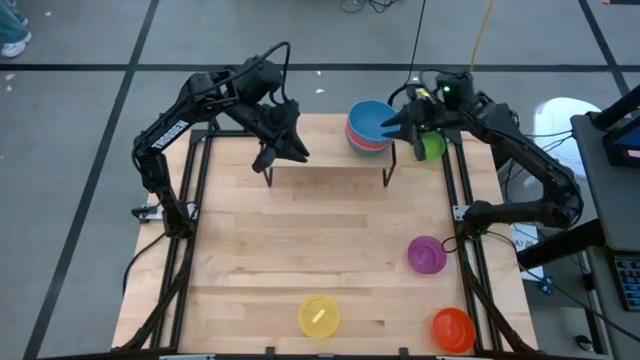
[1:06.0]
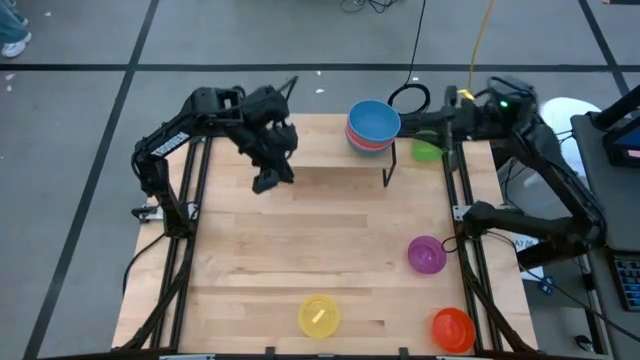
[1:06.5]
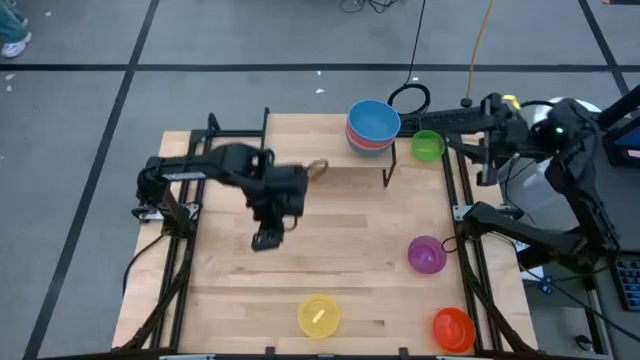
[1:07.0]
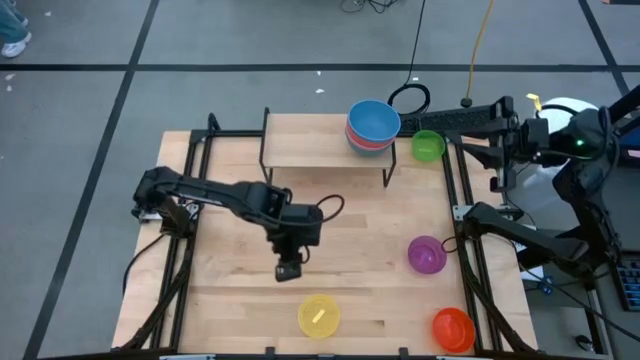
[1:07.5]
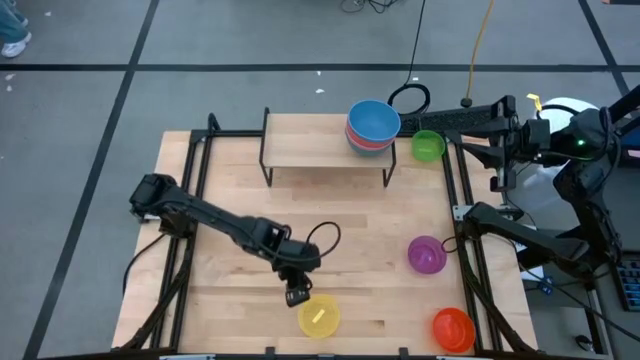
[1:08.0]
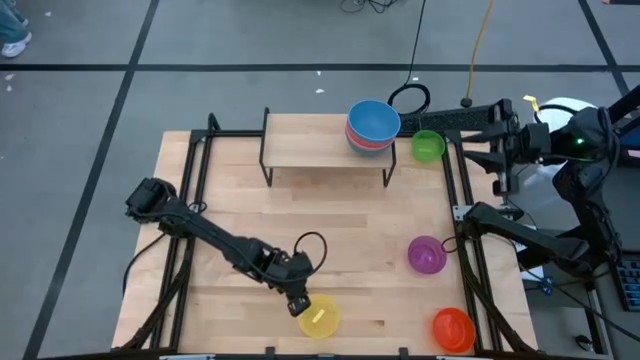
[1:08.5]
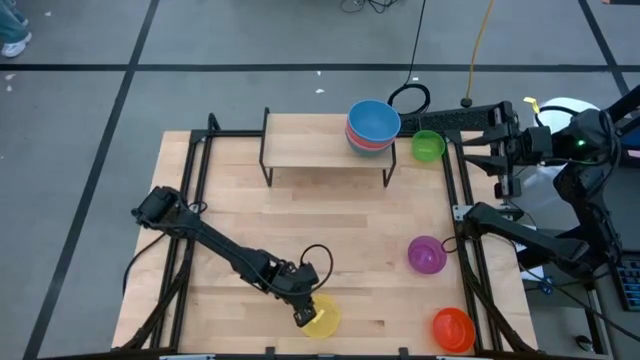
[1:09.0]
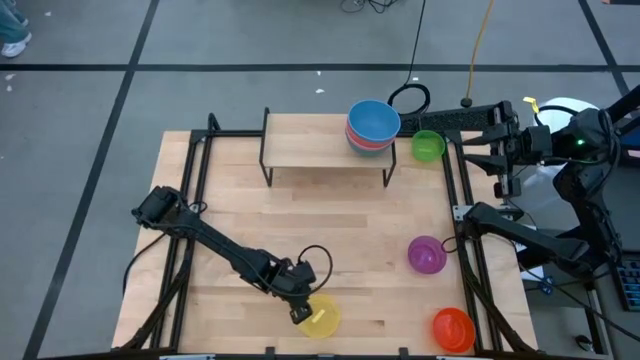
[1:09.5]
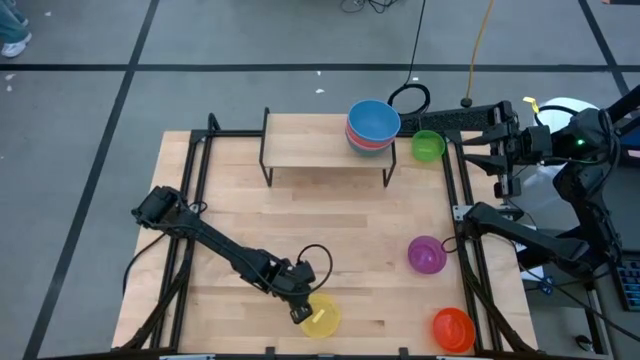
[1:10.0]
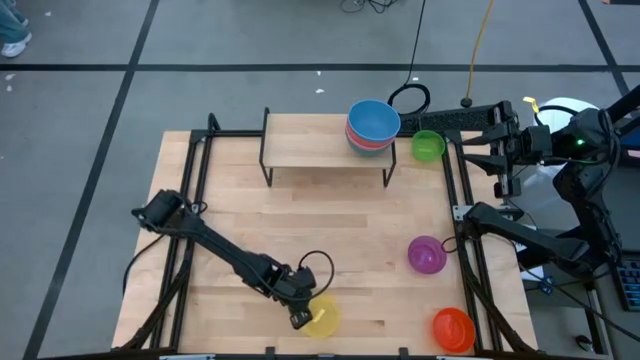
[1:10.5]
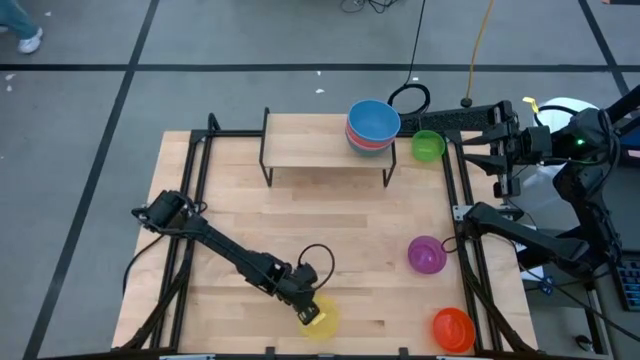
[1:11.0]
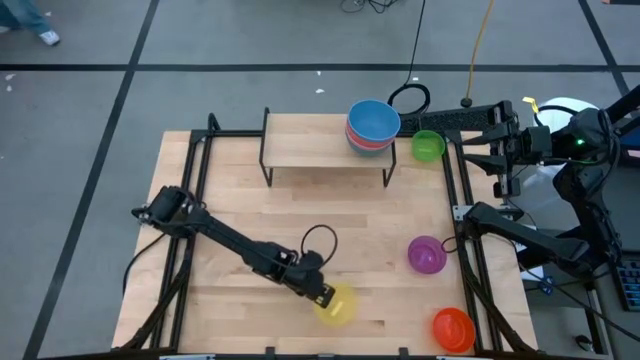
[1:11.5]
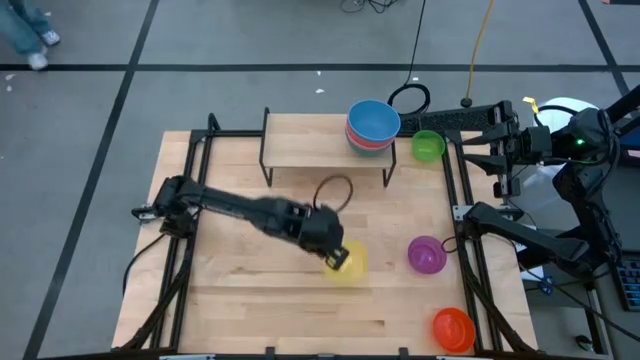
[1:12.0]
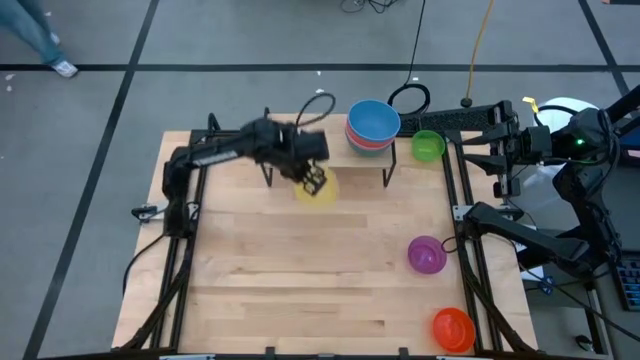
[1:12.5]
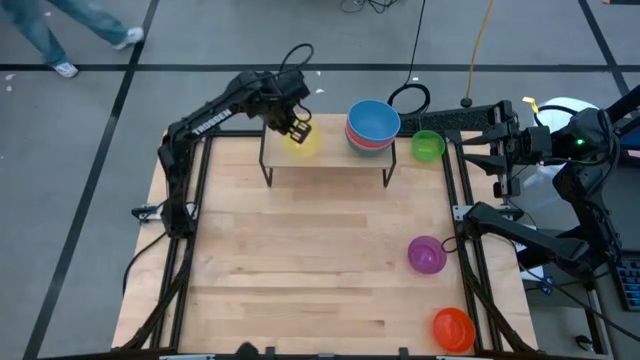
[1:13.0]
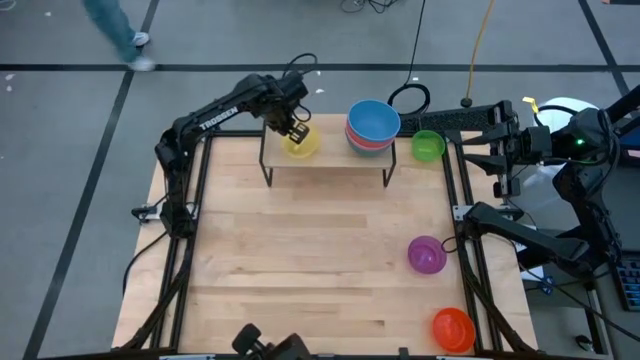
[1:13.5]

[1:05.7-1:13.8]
Task: Place and stack bowls onto a shelf
Put the transparent yellow bowl on the shelf

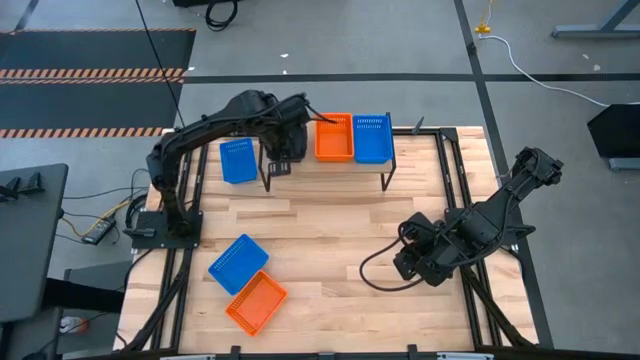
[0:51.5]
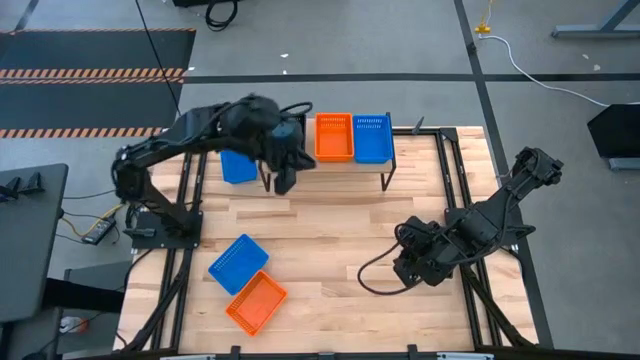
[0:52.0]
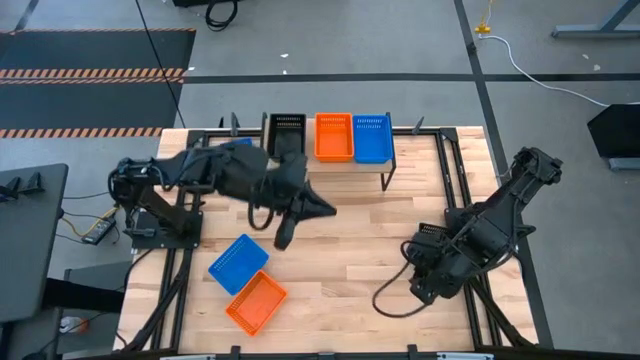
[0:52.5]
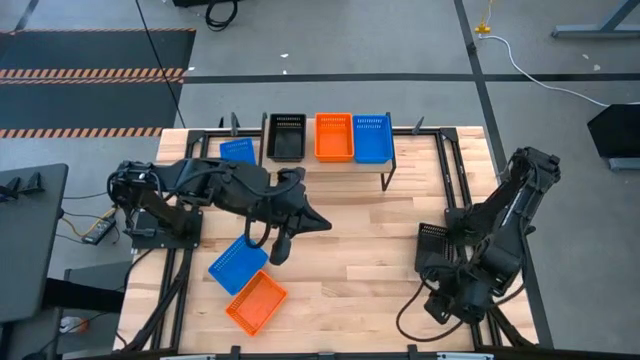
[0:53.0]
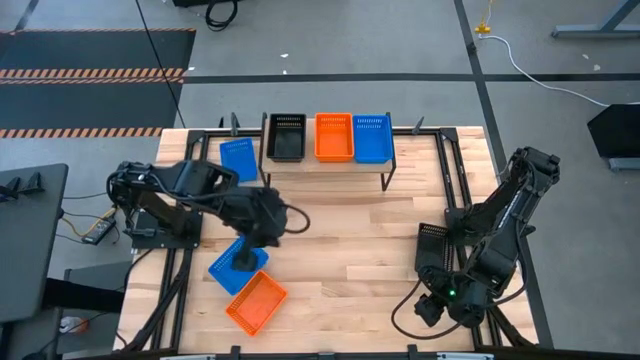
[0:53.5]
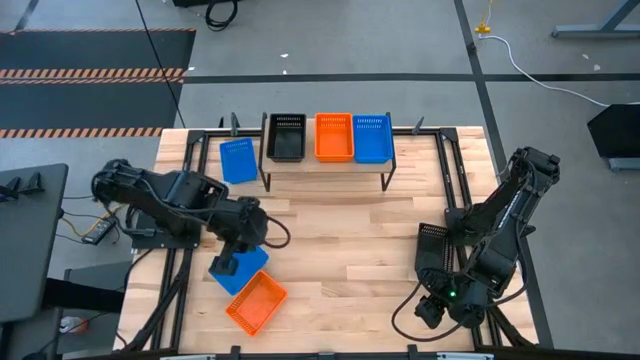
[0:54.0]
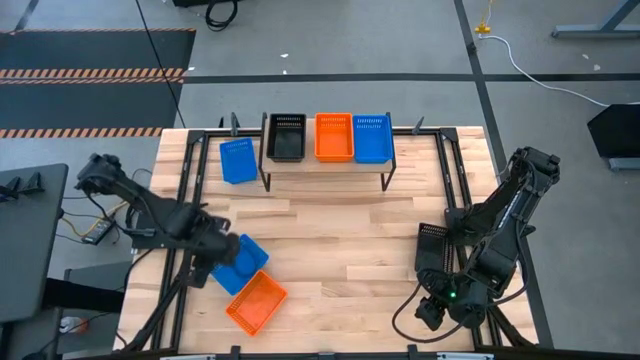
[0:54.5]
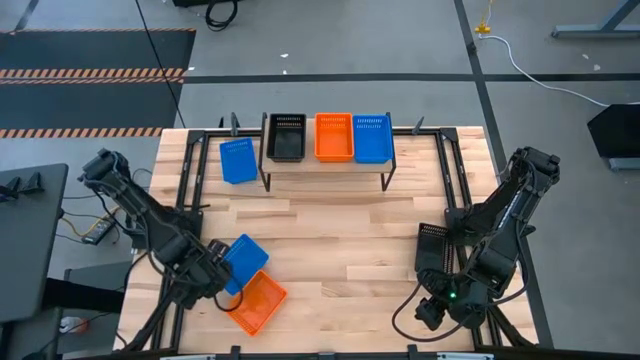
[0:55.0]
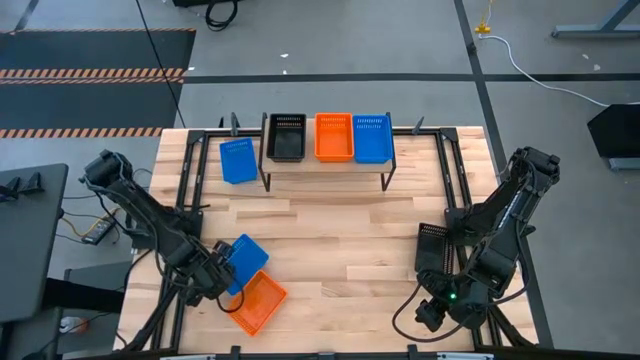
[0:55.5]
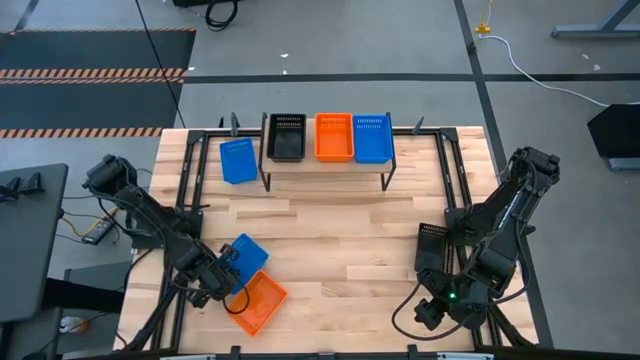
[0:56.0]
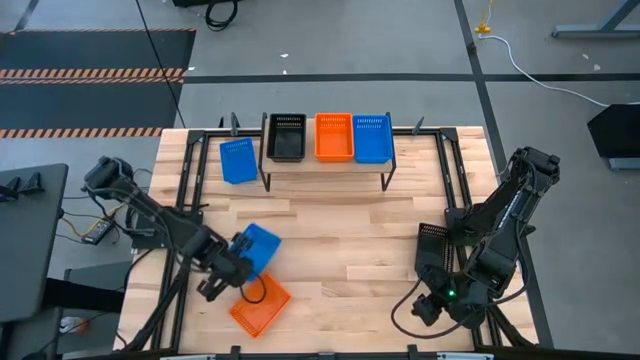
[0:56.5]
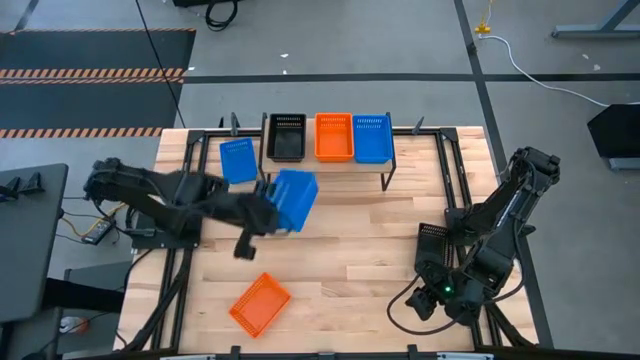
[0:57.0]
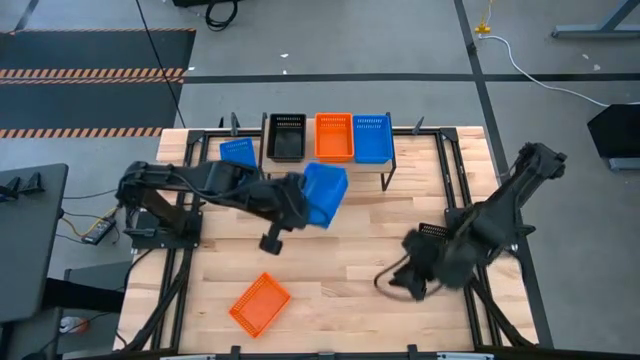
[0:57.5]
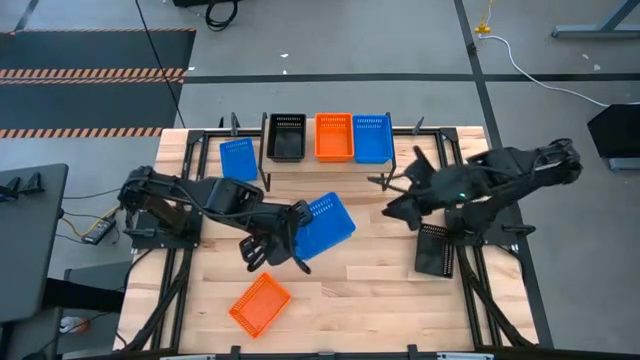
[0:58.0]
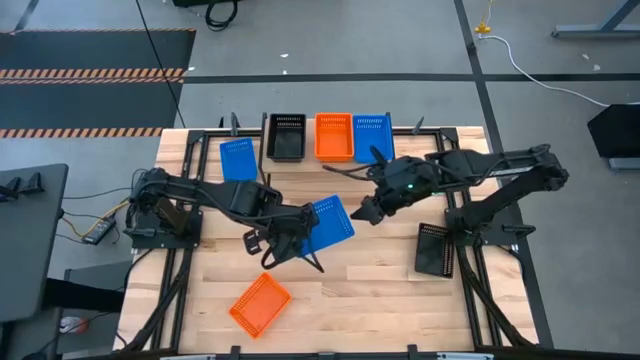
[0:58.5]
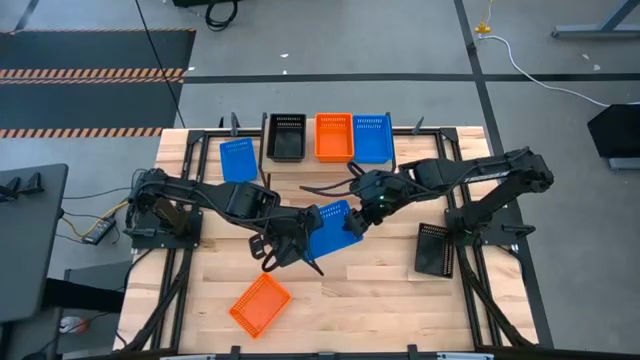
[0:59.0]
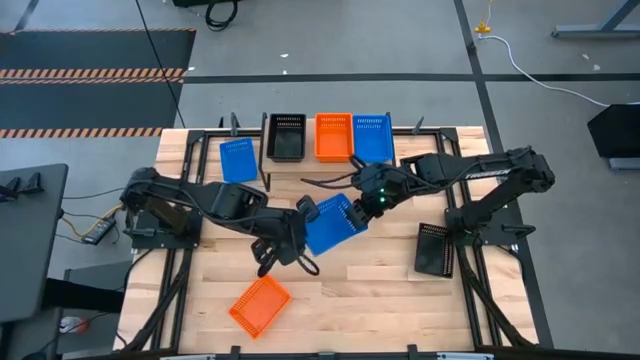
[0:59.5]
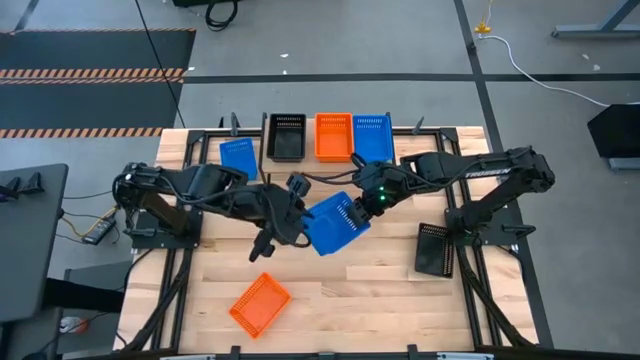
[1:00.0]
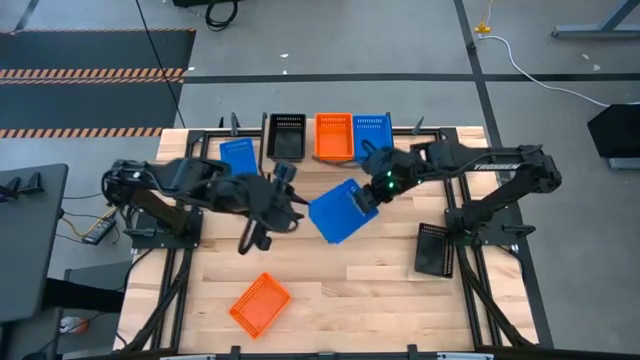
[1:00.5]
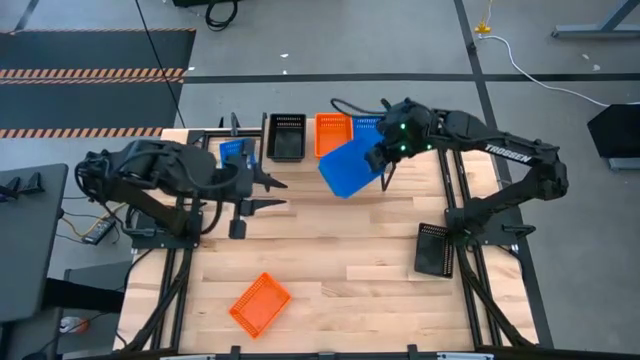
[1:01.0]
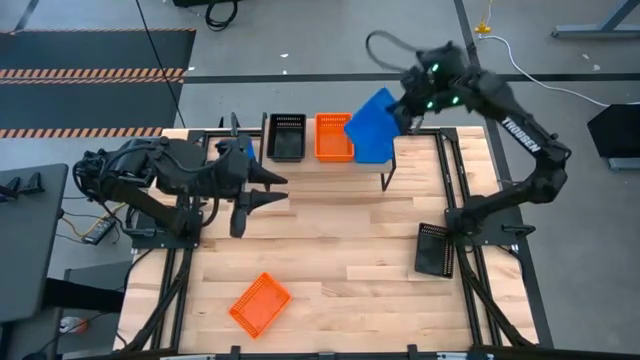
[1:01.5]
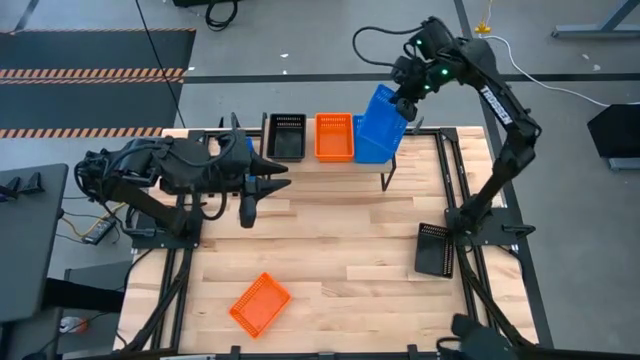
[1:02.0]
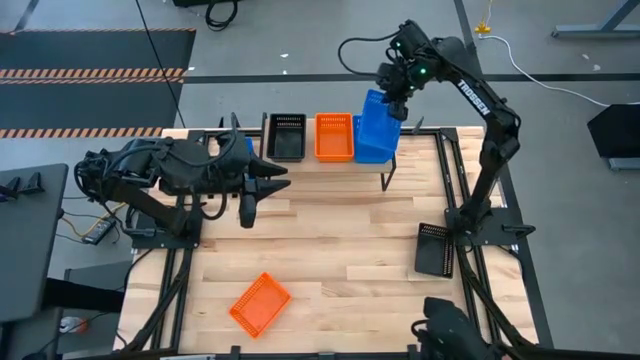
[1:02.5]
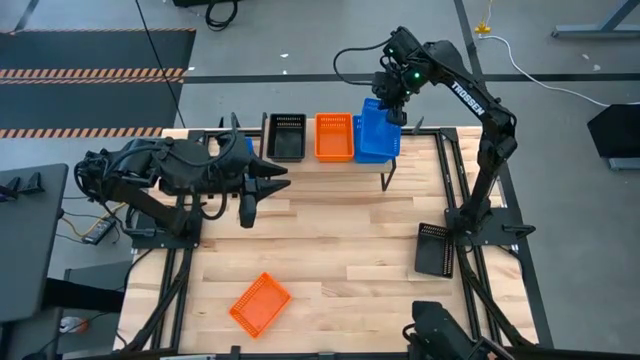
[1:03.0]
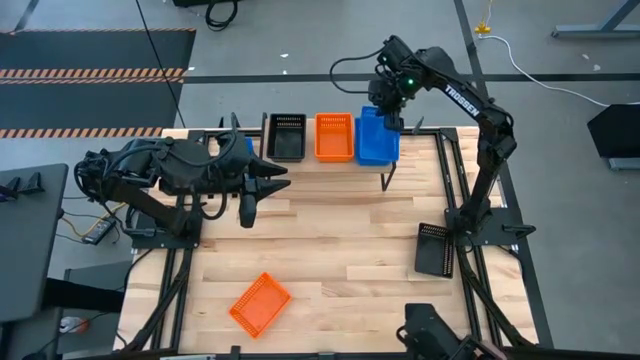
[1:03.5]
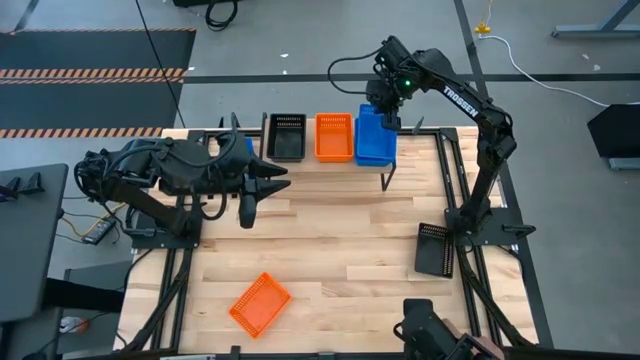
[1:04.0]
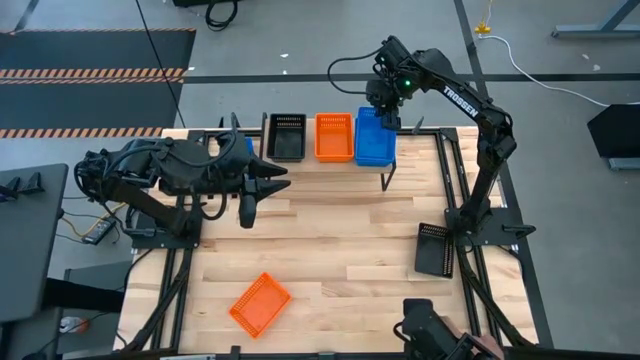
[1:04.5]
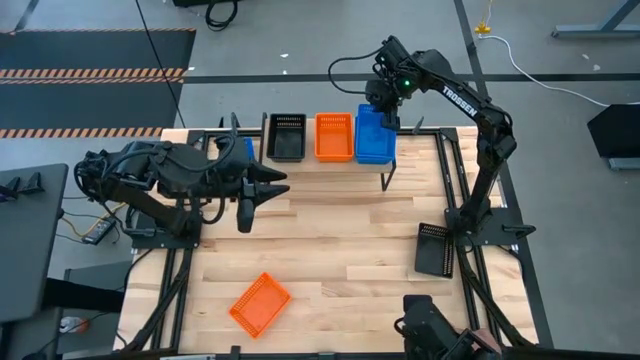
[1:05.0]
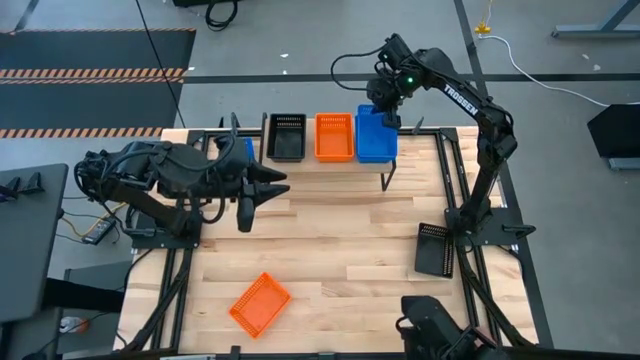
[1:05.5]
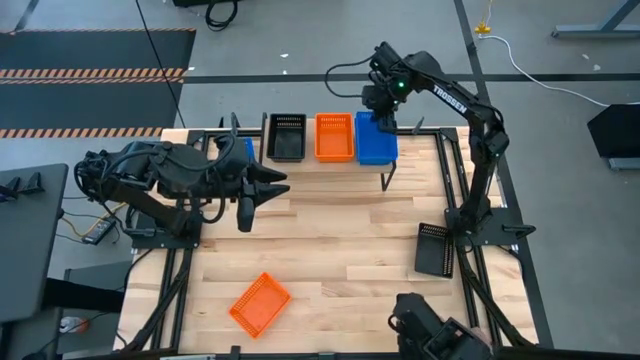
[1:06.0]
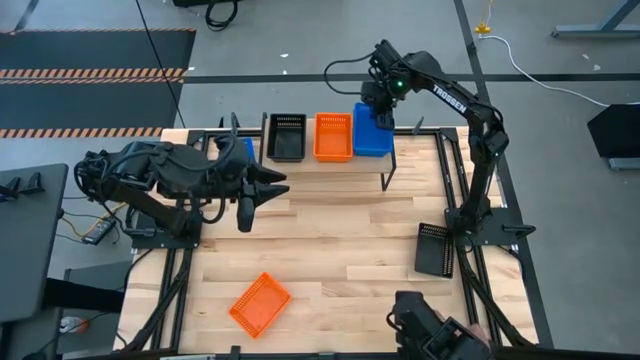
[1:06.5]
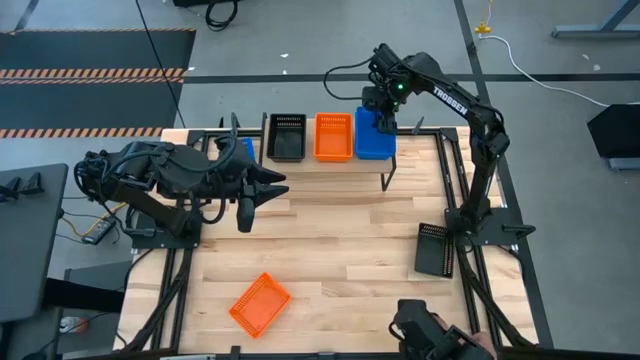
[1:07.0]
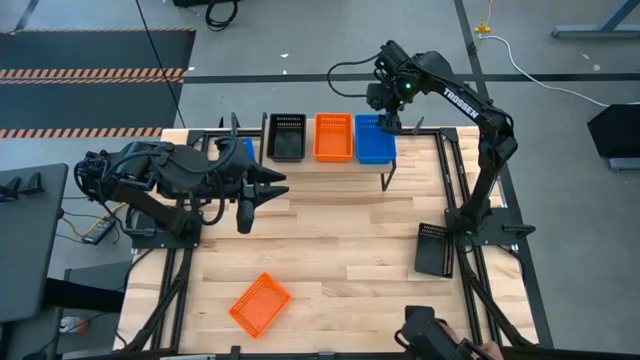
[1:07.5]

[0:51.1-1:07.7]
Task: Stack baskets on shelf by color
Stack the bottom blue bin on top of the blue bin on the shelf
